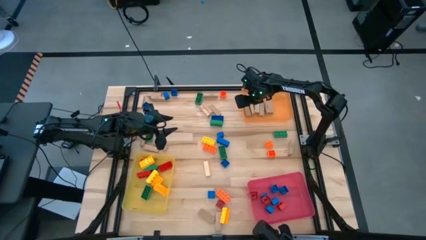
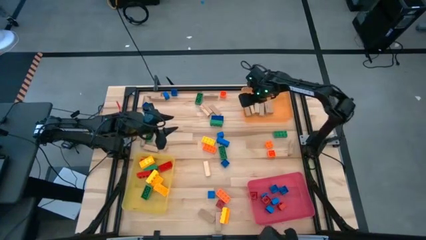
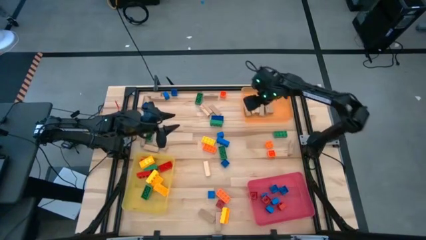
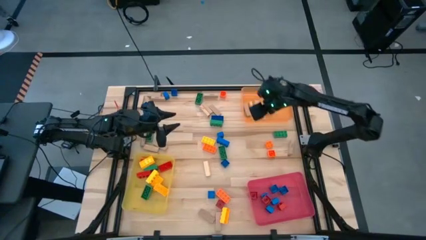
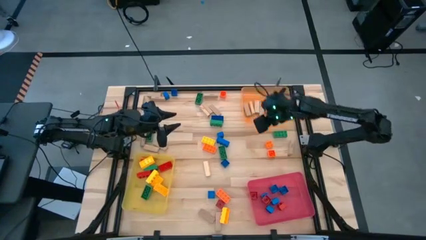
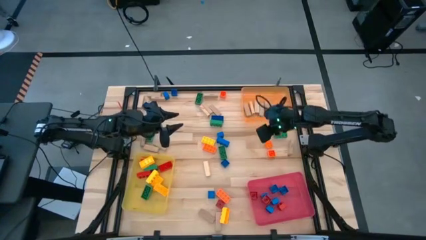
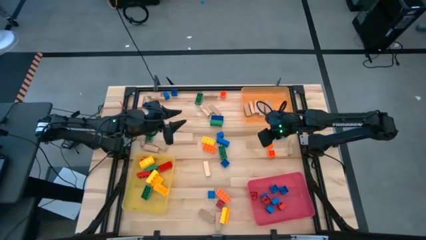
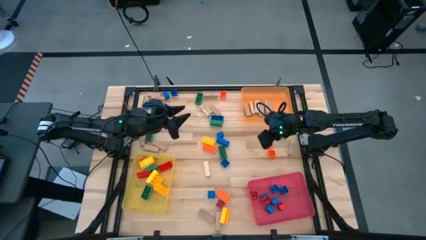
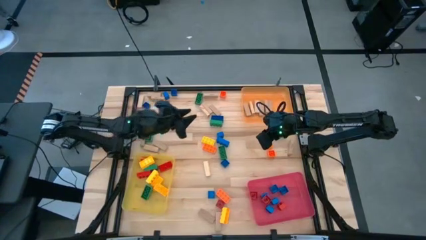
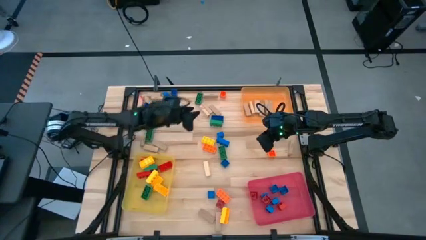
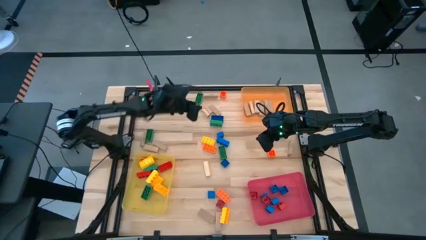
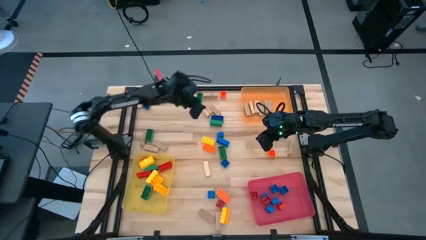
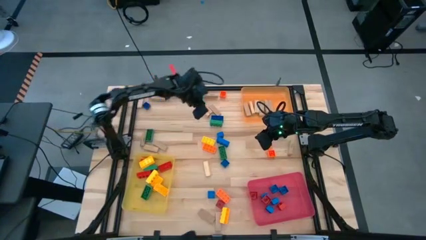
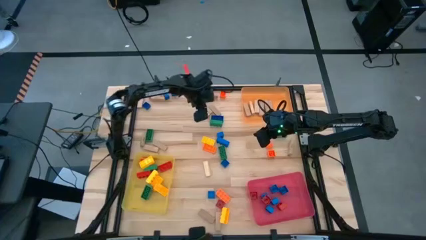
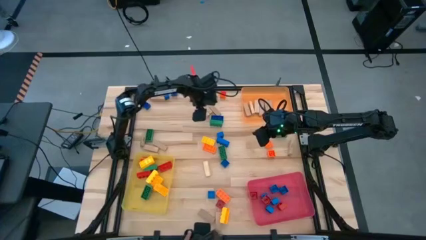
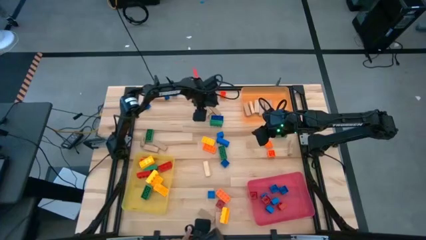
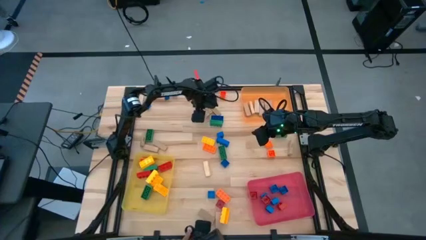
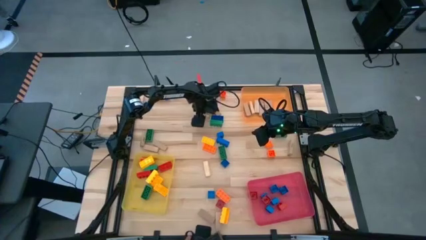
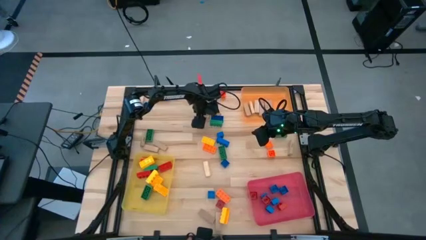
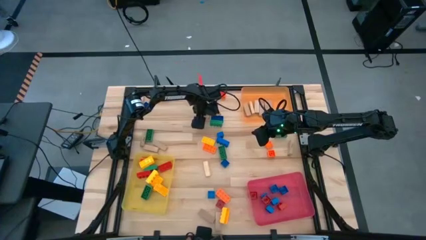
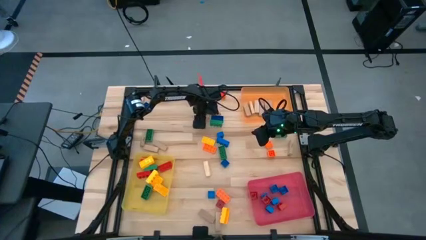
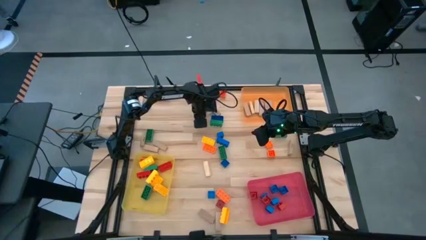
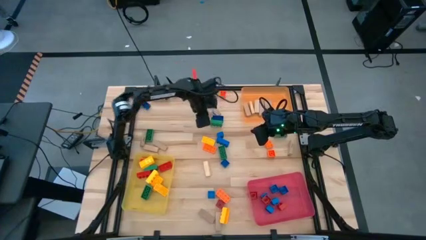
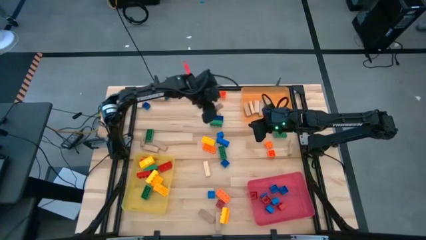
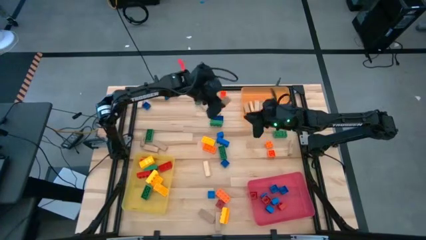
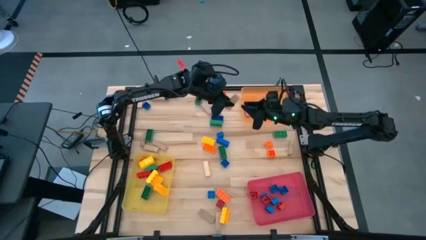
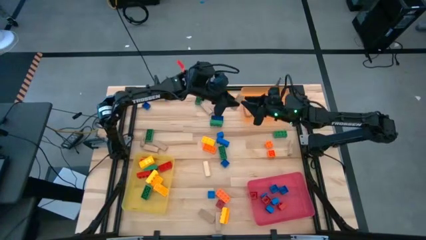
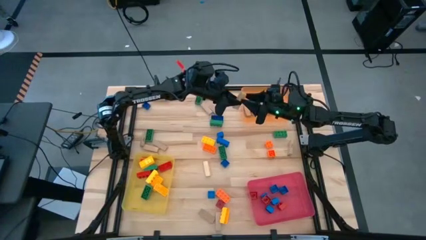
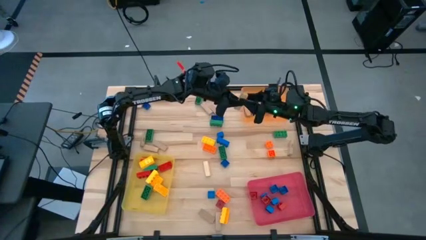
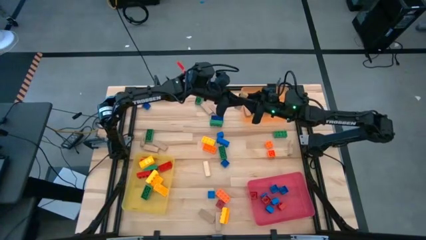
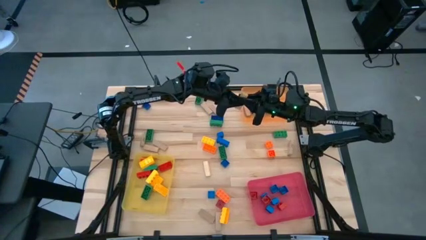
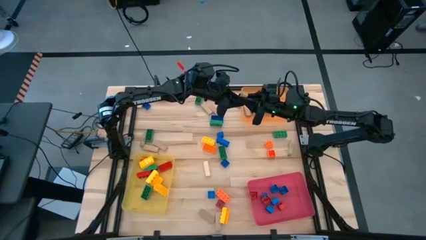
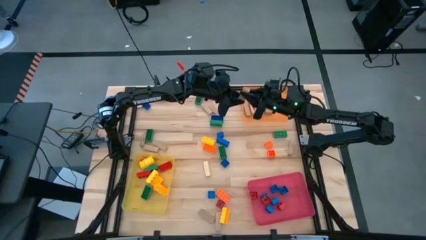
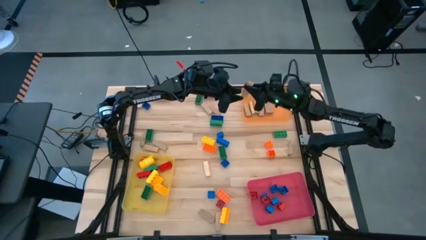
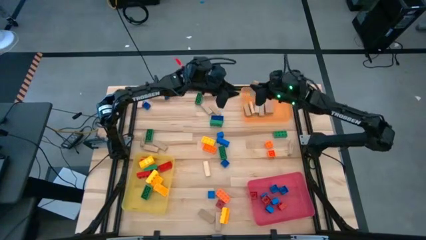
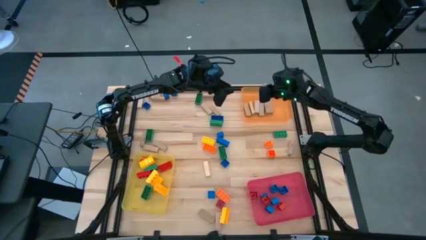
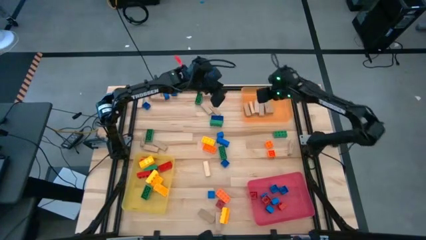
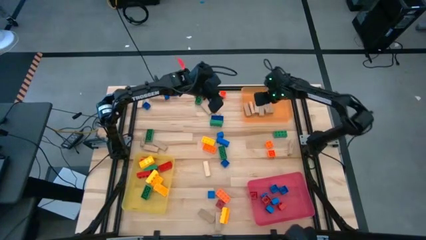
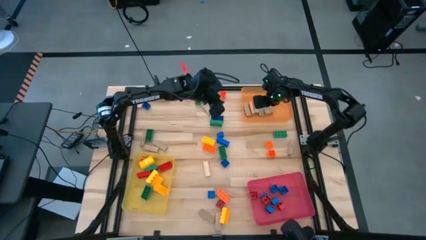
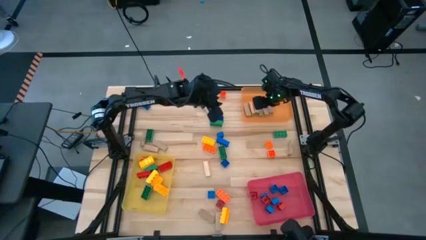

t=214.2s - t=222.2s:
Task: Sort blocks by size
Put the brown block into the orange bin

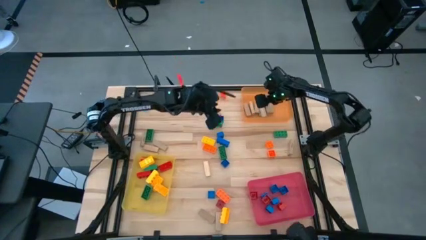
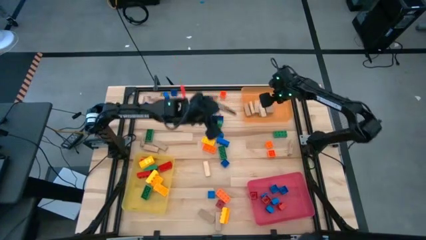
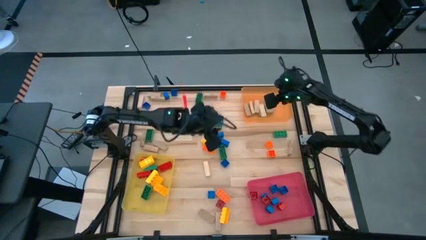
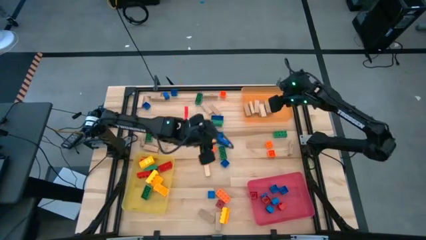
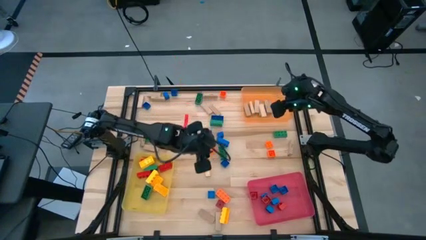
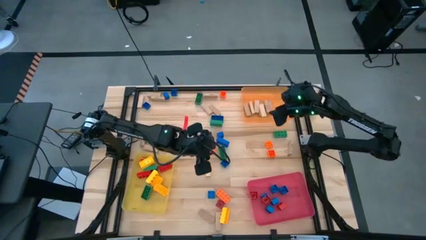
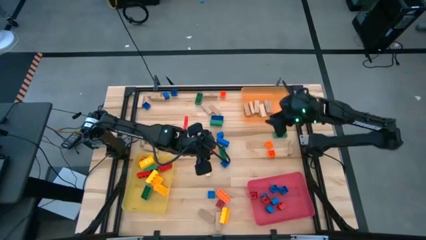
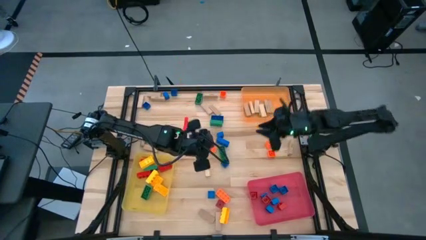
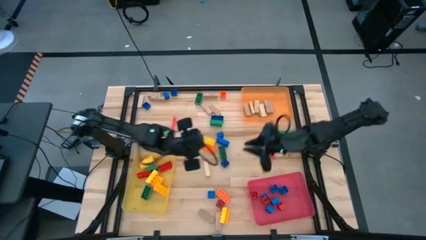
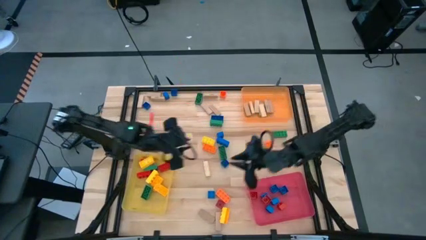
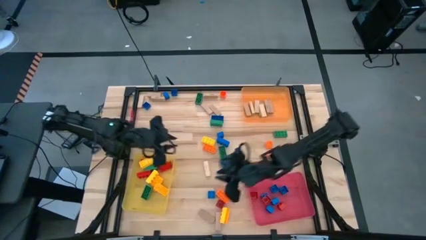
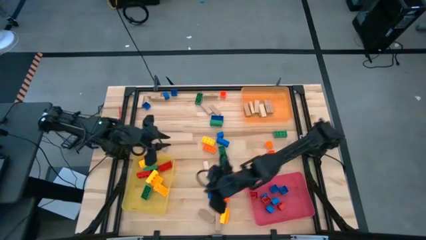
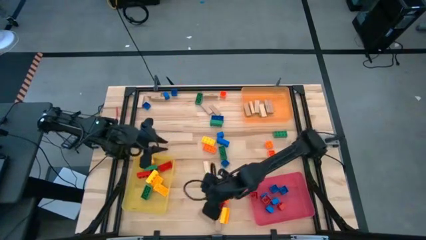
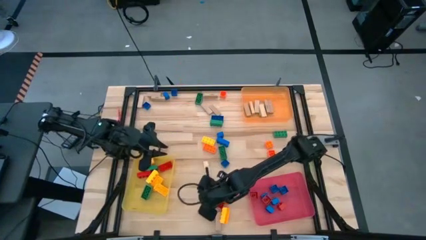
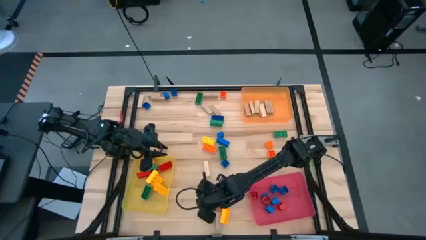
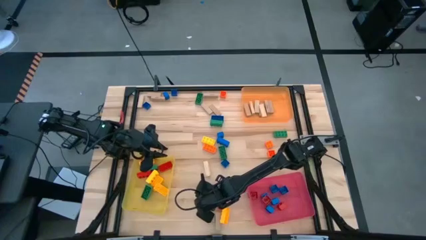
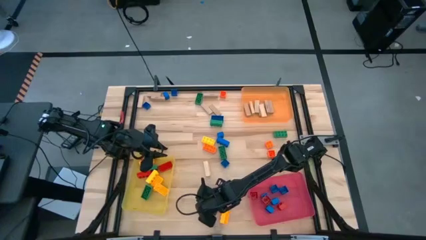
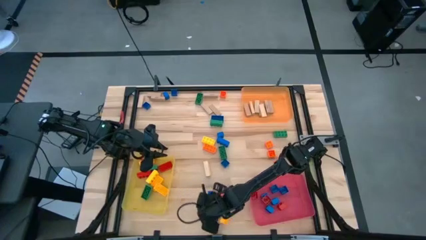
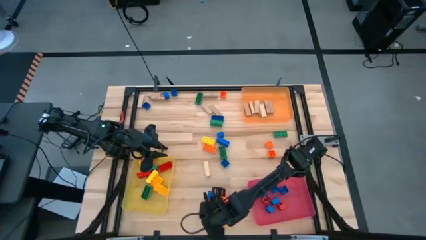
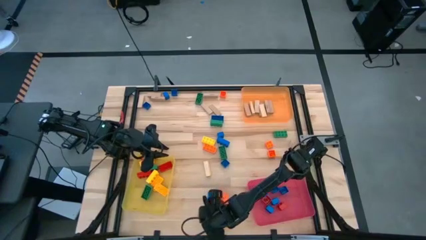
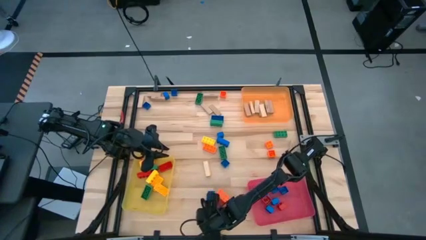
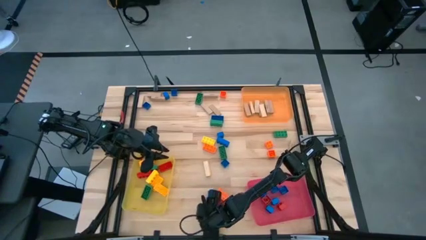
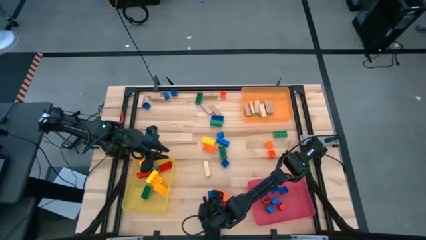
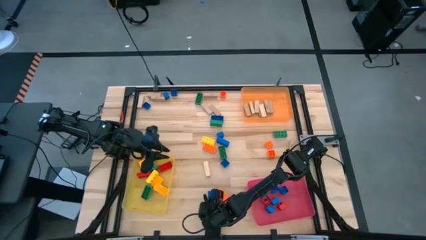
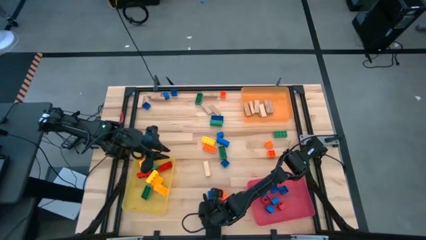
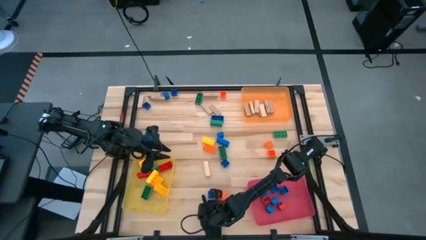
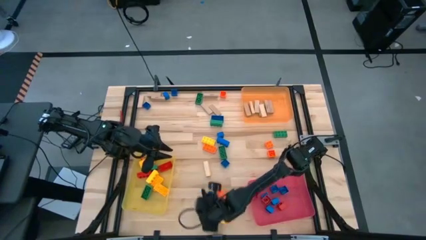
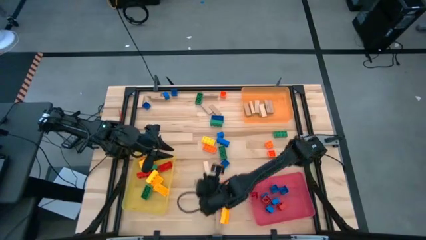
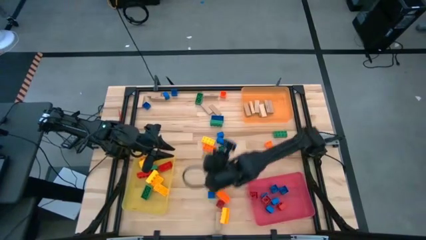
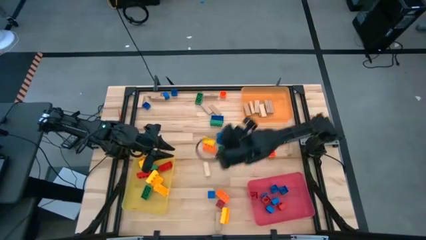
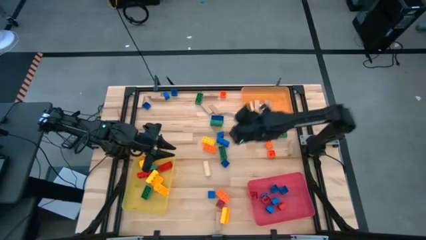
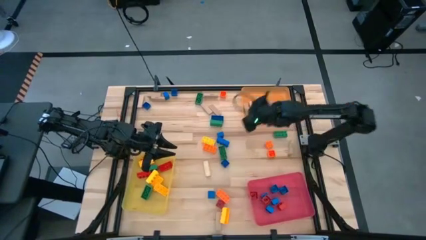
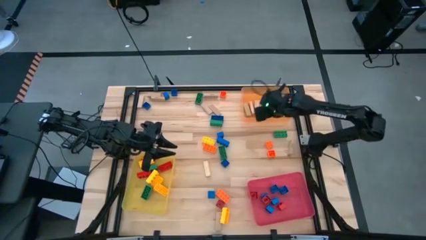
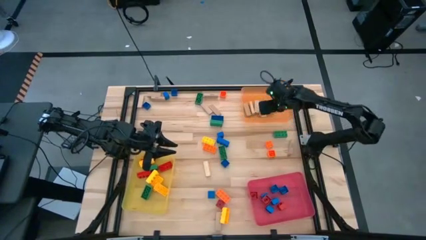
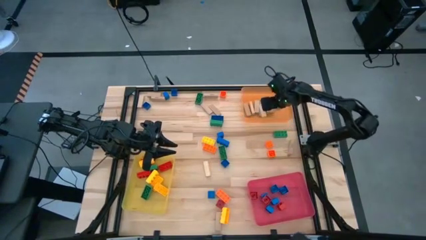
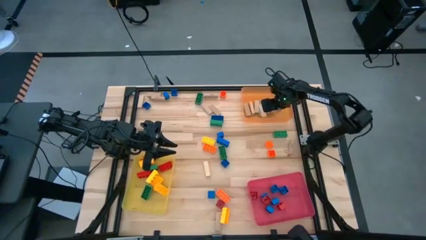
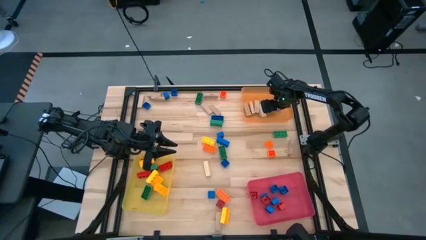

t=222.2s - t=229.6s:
Put the brown block into the orange bin
